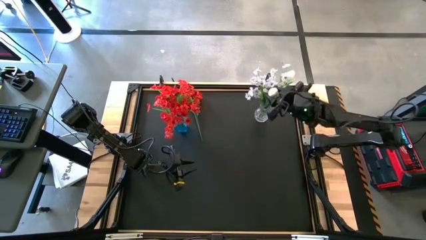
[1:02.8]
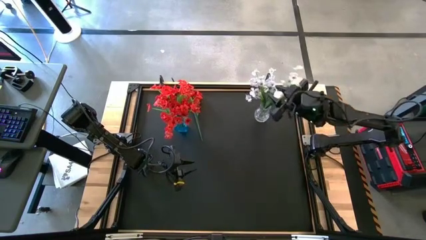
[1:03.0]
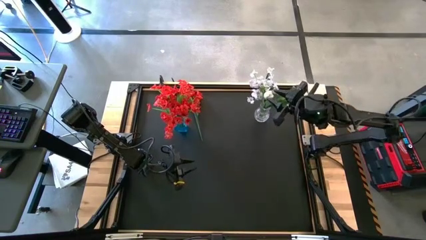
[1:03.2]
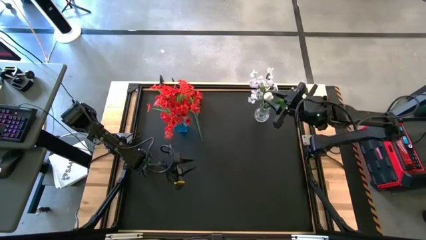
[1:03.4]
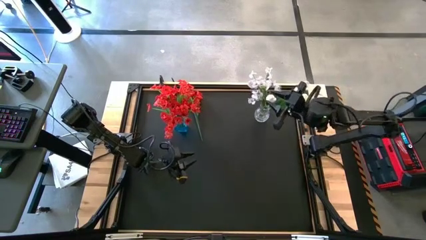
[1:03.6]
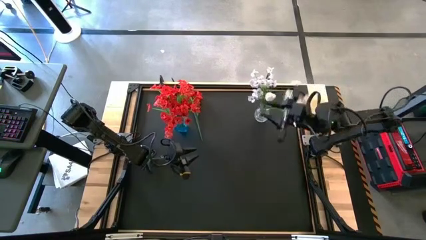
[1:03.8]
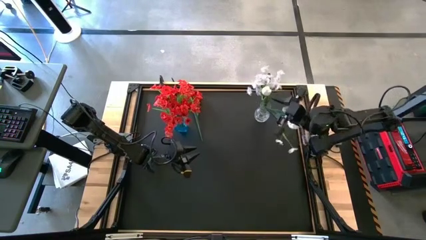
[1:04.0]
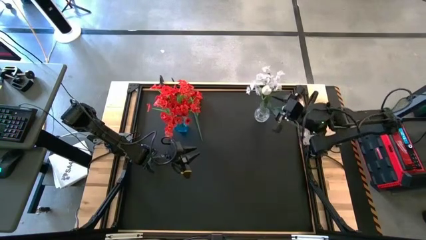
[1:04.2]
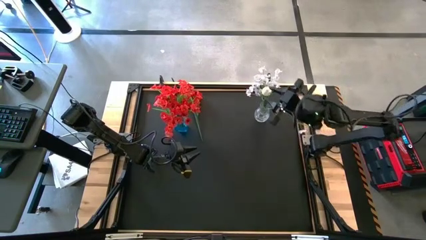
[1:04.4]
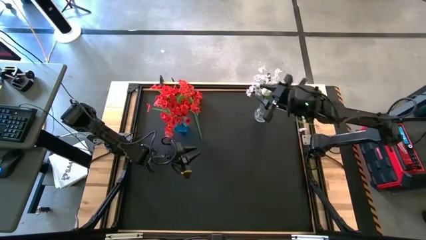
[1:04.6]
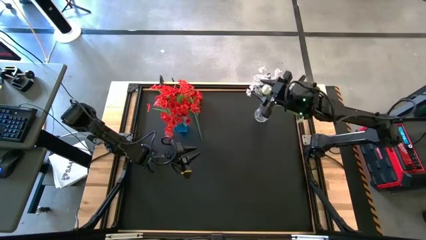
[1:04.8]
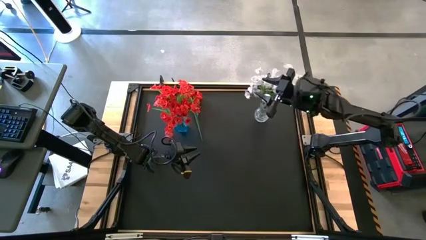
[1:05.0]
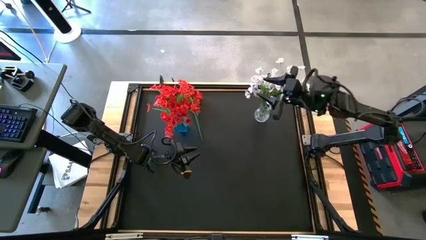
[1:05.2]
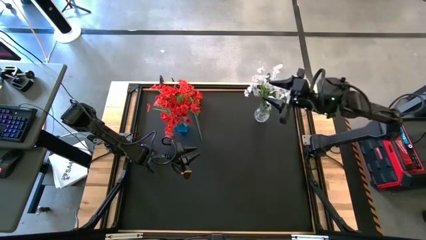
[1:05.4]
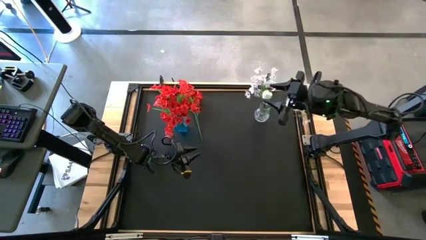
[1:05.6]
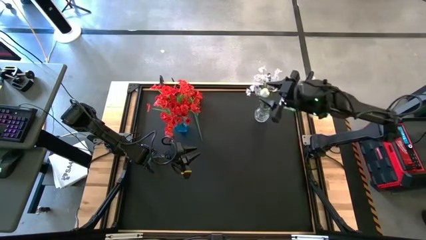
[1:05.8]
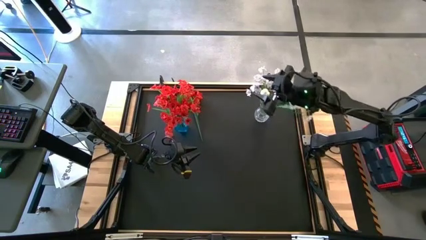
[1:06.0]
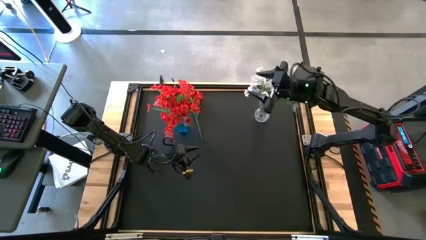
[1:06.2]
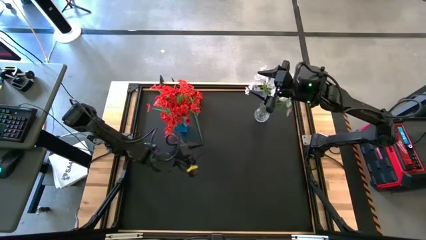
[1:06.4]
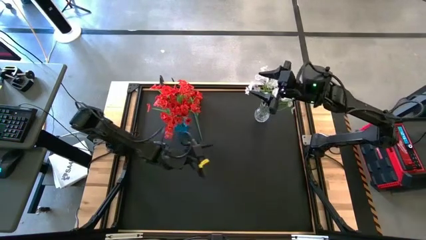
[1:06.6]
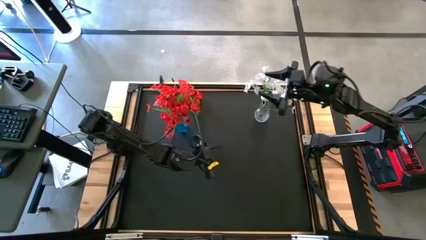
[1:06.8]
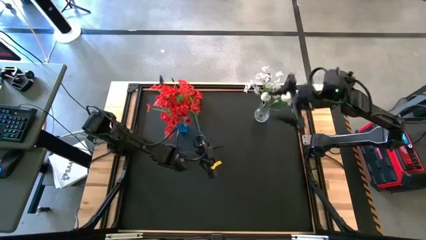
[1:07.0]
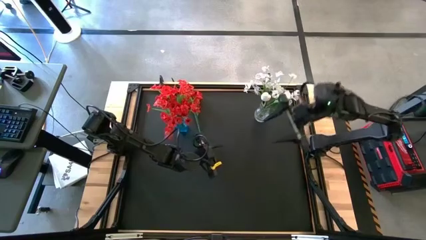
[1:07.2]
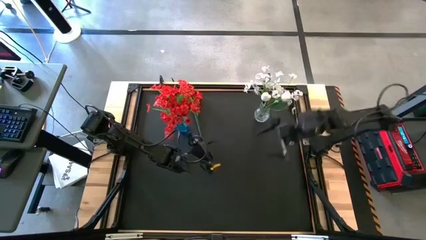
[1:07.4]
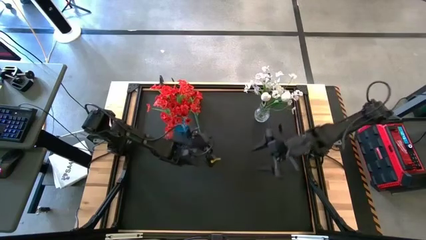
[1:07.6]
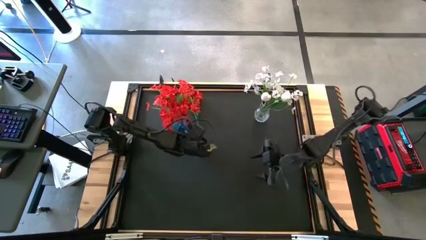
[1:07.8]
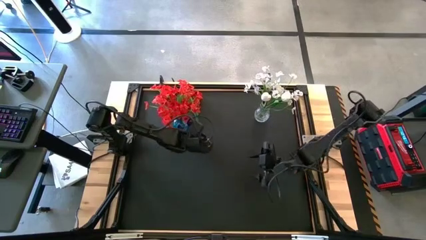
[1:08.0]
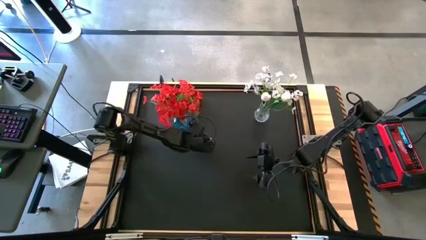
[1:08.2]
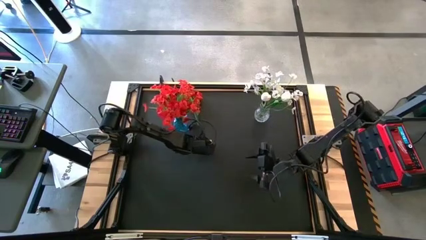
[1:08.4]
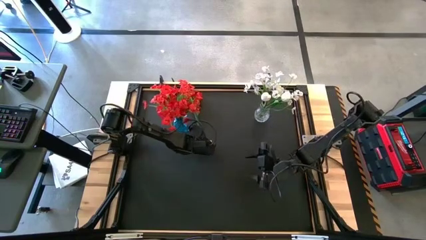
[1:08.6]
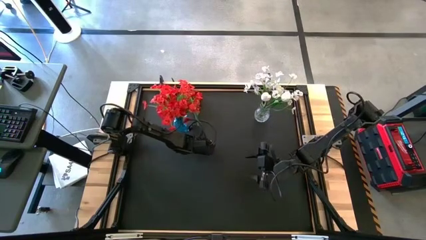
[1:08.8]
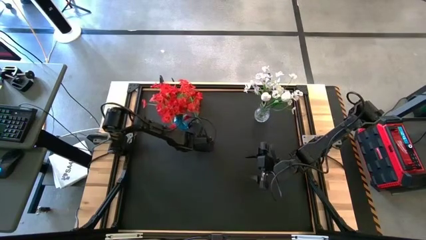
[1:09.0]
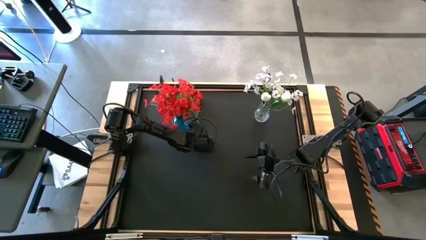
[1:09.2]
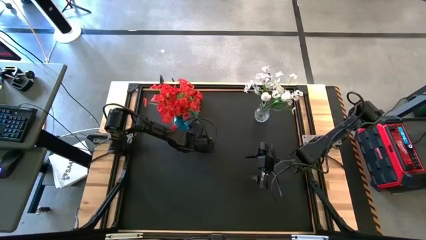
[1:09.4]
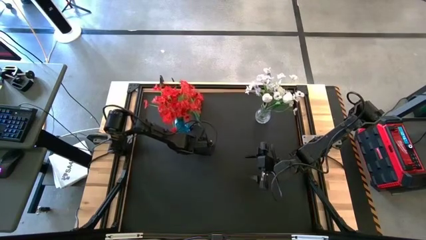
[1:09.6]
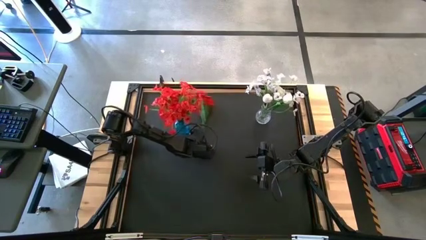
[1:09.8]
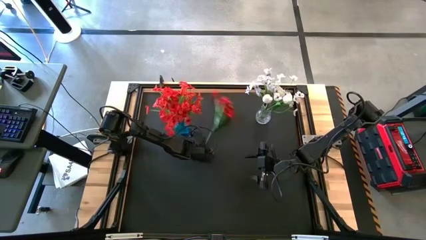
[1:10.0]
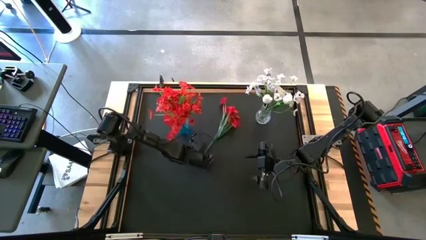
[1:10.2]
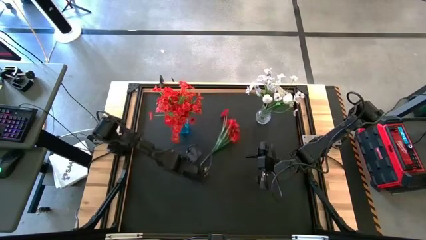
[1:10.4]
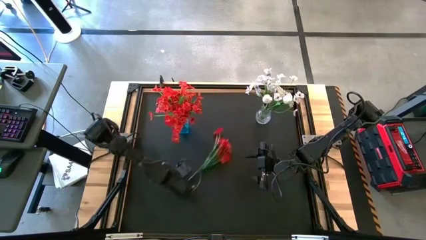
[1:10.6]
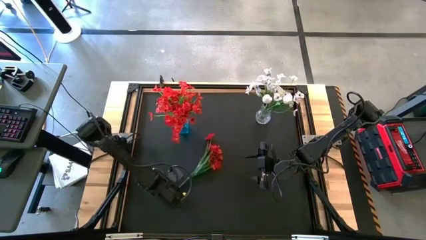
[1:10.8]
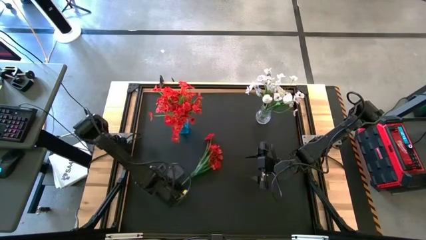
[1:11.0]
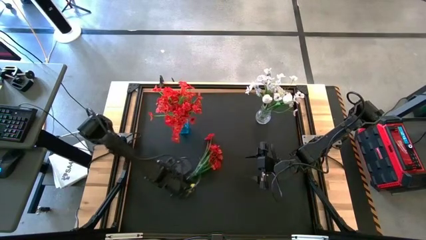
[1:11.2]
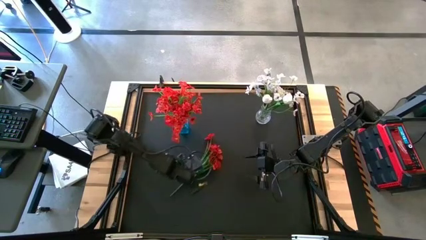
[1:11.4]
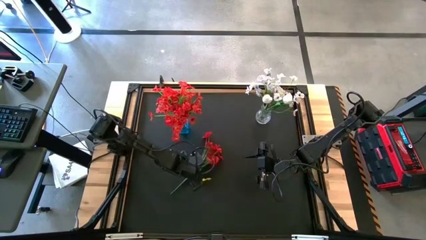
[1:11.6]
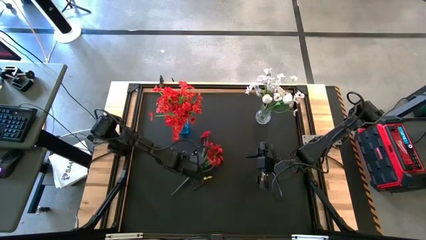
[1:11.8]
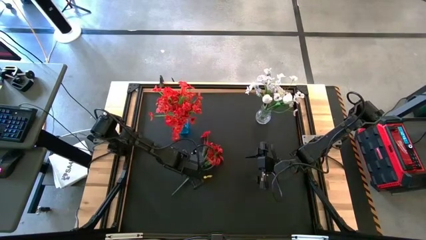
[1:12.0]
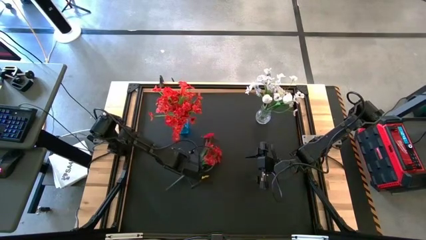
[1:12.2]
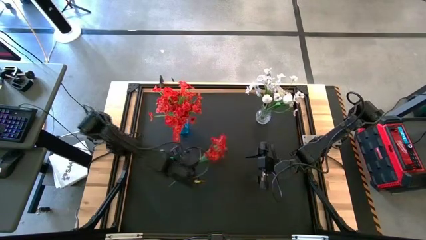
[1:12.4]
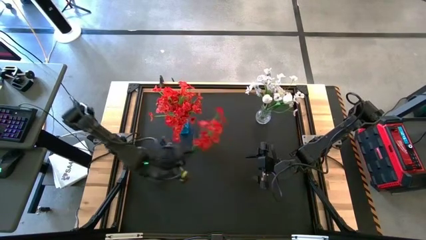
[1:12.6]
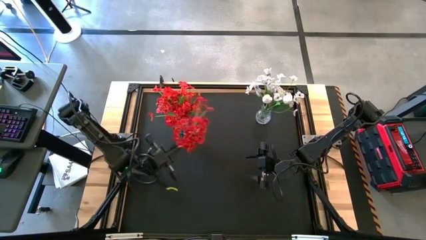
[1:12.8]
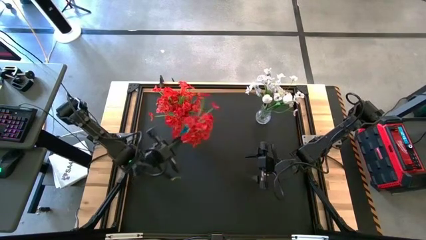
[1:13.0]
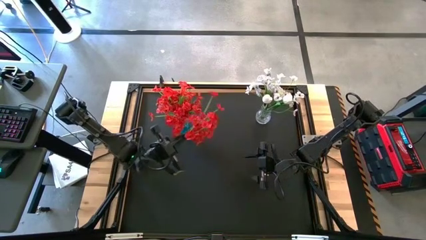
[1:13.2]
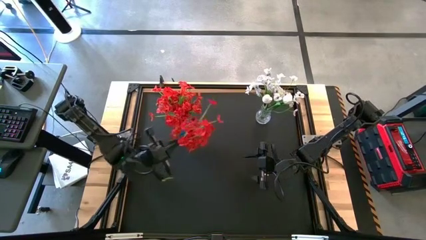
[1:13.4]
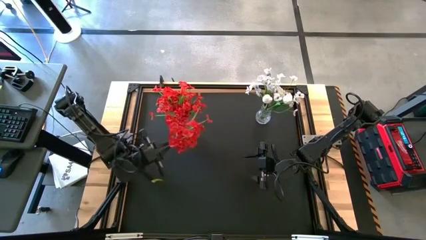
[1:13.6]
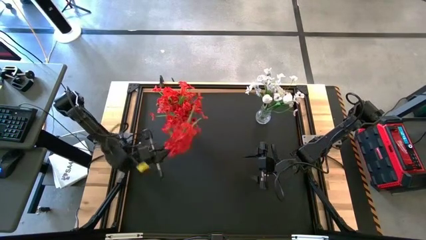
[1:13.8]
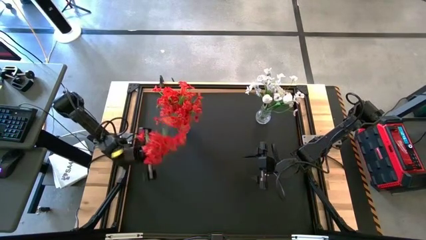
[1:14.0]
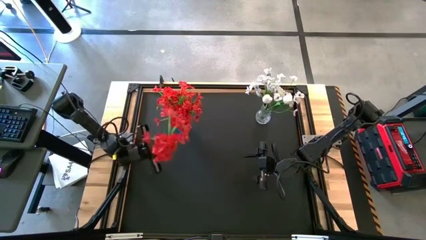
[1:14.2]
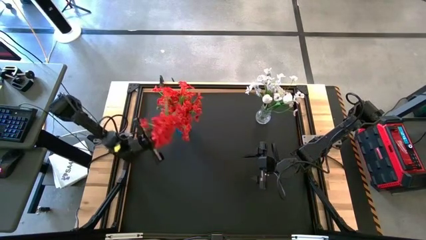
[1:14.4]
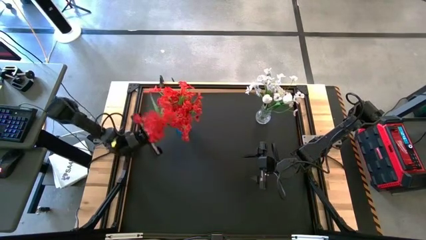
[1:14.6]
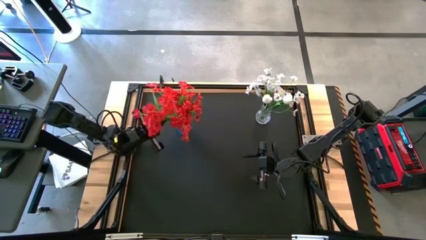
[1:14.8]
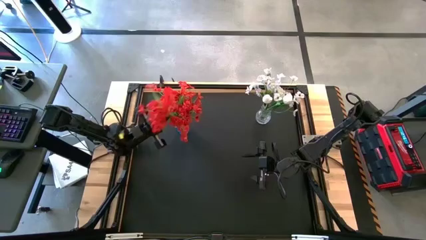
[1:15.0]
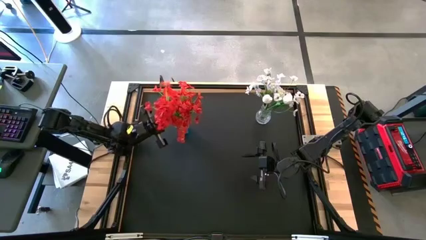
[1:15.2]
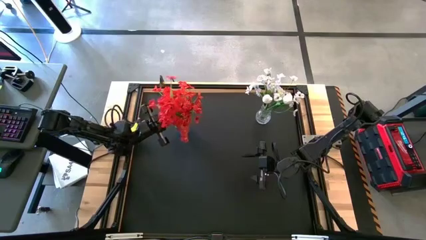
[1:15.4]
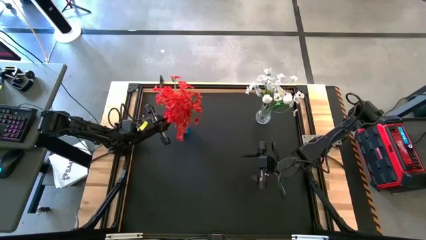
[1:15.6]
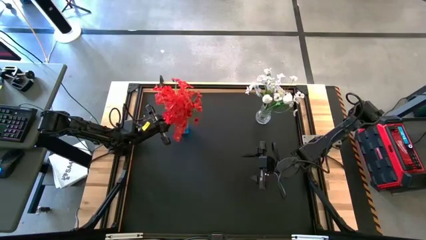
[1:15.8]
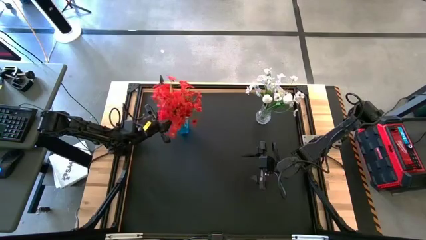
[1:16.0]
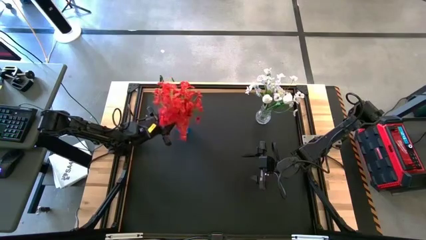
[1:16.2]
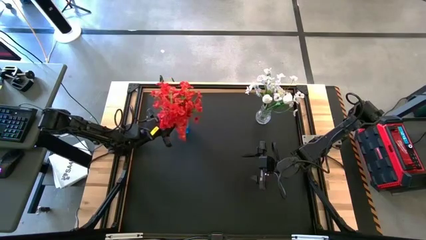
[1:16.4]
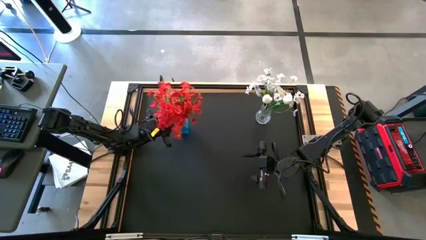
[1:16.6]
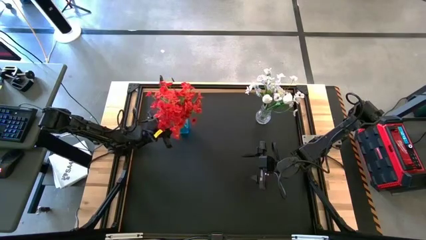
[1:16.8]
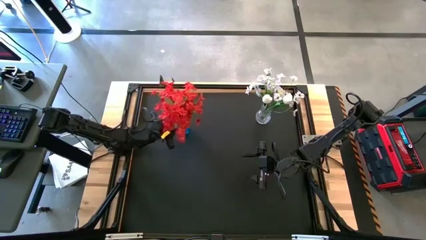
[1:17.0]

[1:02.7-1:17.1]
Task: Sort flowers into vase by color
Put the red flowers into the blue vase
